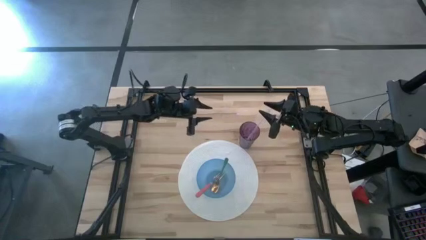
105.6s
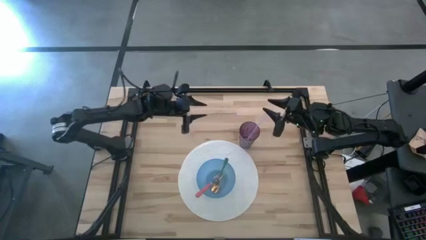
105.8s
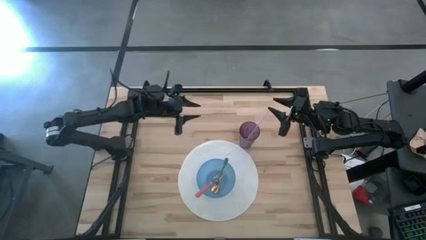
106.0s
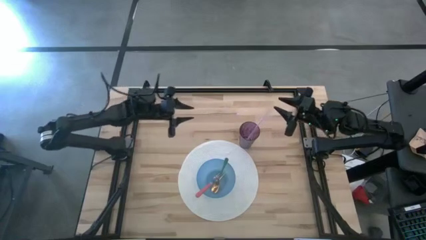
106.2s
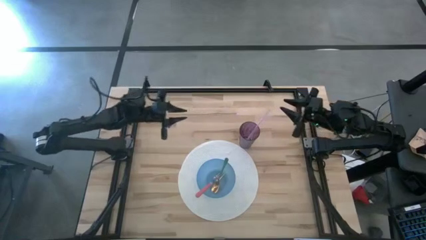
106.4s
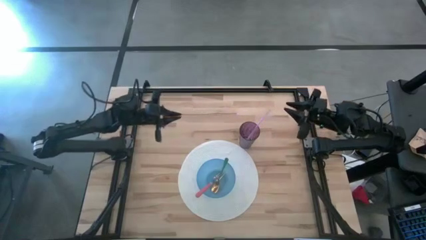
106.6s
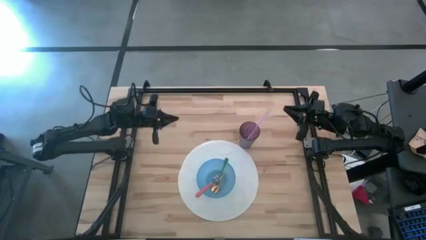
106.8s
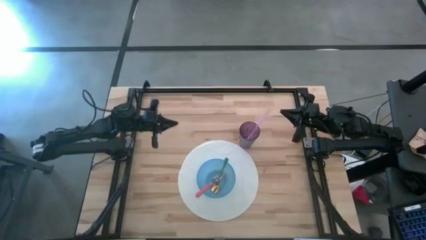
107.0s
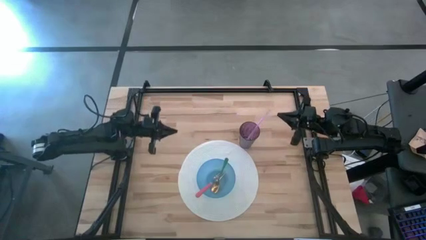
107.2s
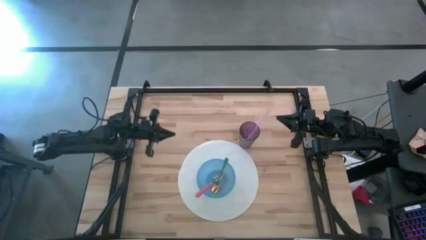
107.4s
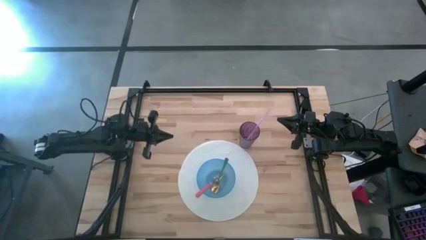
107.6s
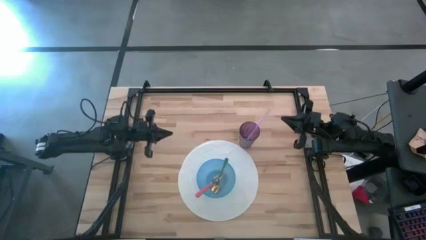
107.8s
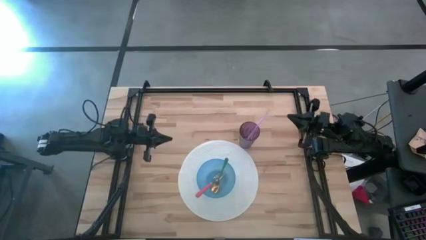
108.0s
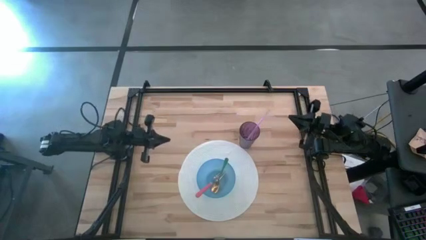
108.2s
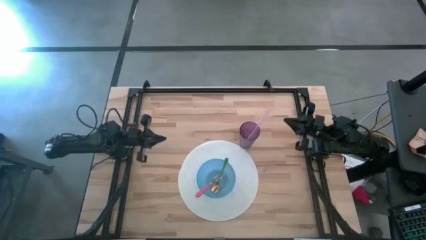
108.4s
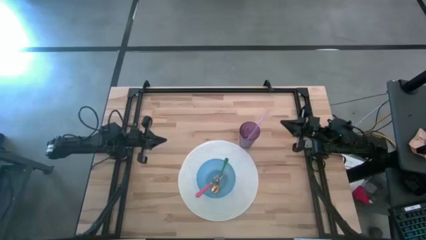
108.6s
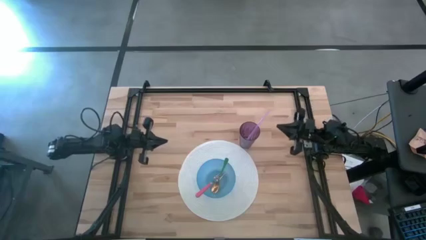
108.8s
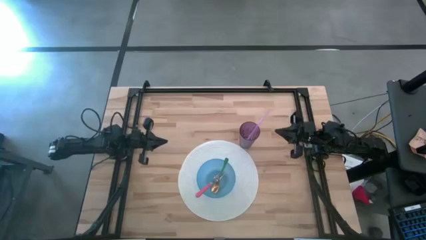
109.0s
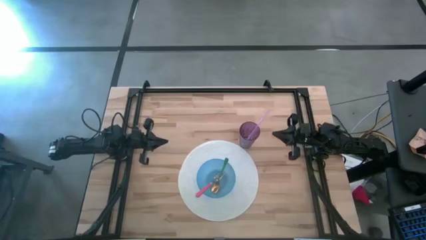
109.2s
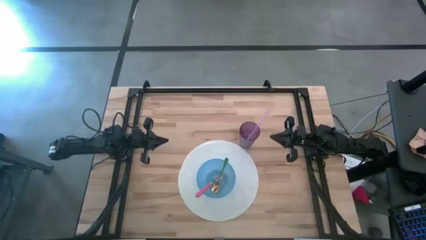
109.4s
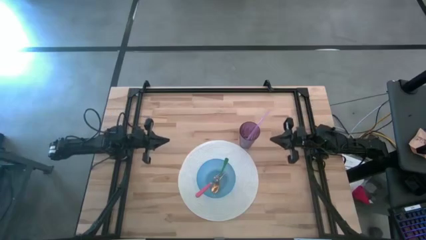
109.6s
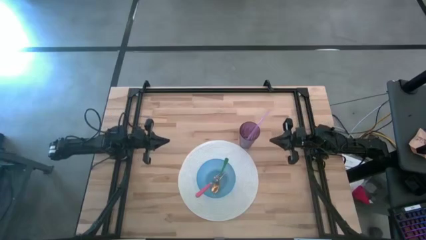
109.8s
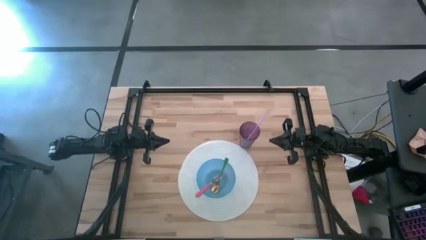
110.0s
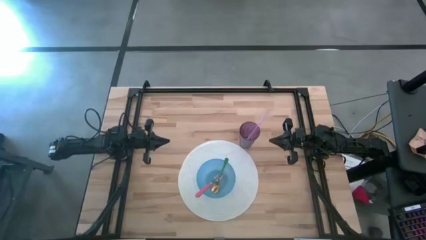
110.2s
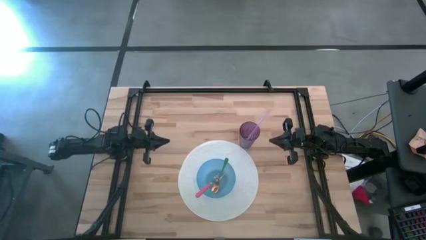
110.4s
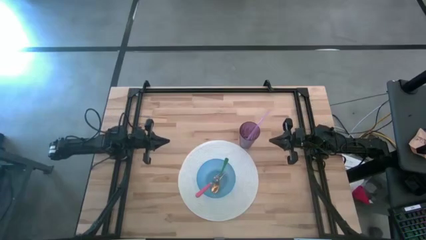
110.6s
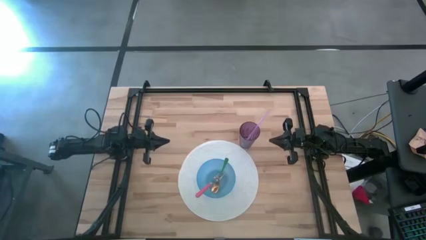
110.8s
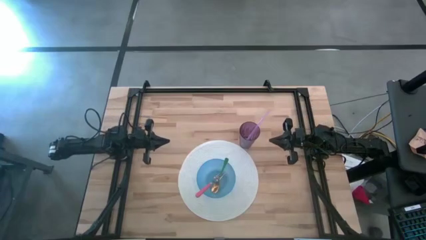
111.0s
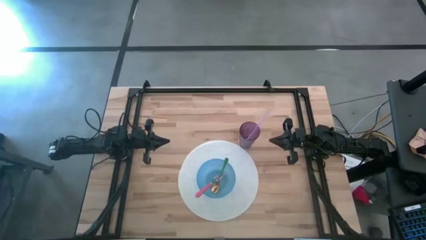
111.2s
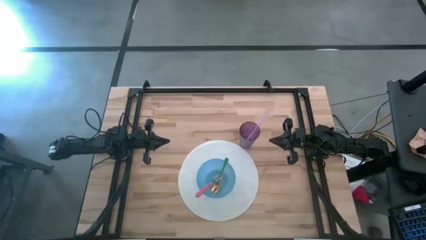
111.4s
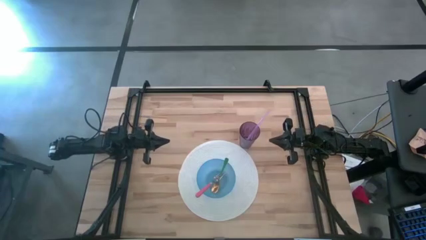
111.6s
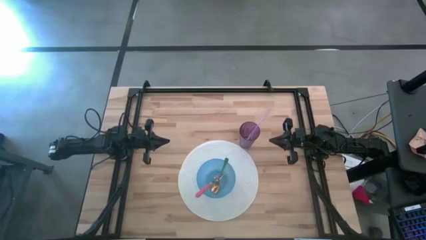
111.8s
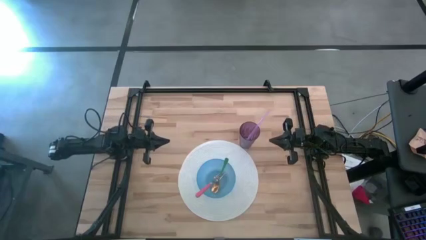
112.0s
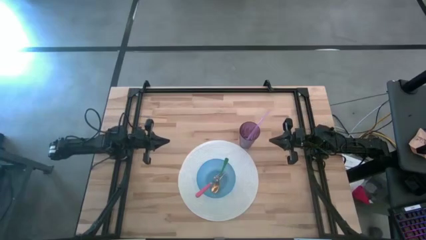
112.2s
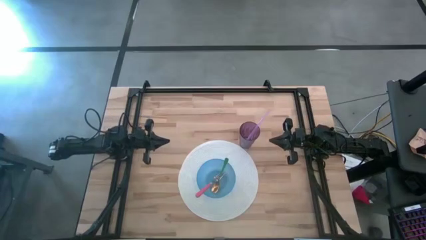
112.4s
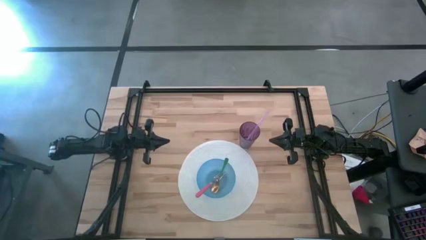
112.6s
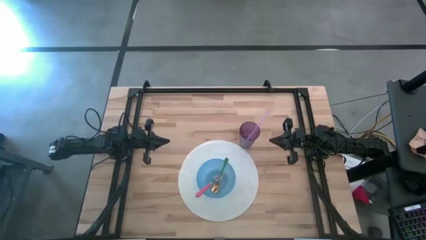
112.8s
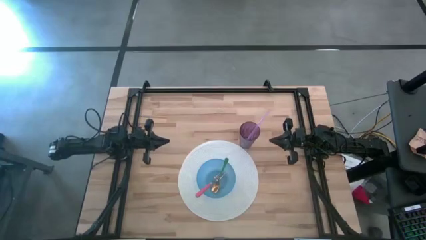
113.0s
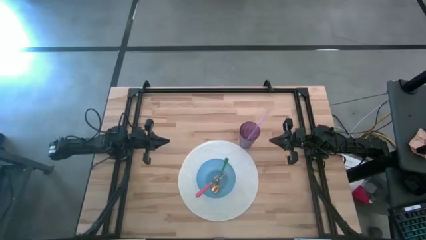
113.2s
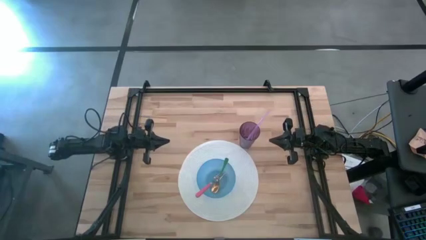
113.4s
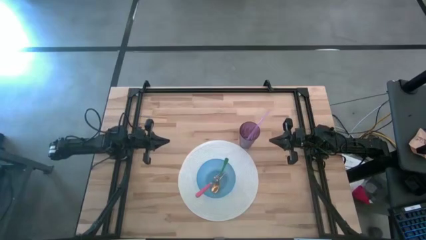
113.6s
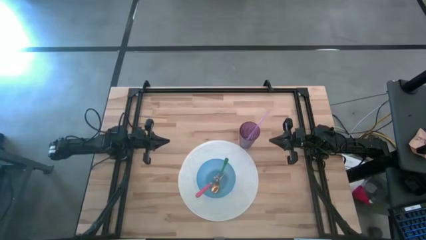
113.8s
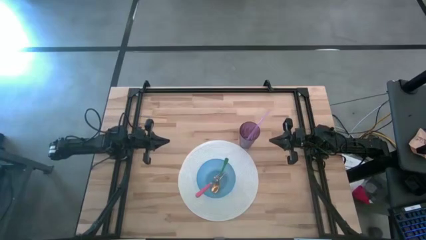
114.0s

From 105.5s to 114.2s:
Task: Pick & Place Utensil
Return to Home Position

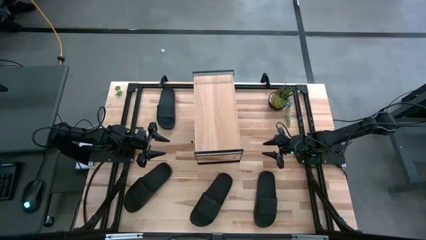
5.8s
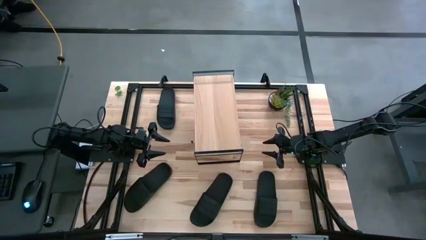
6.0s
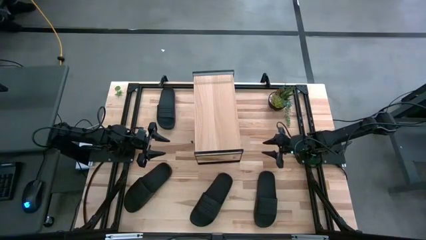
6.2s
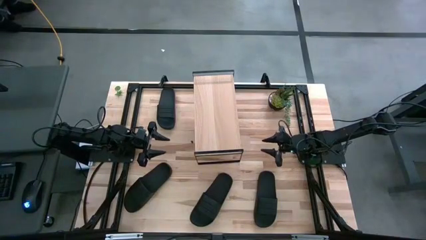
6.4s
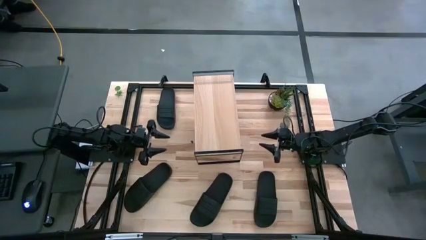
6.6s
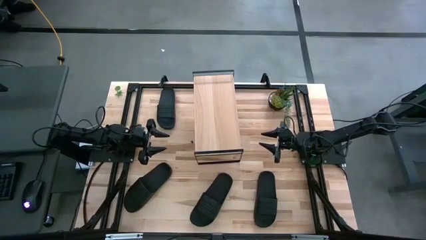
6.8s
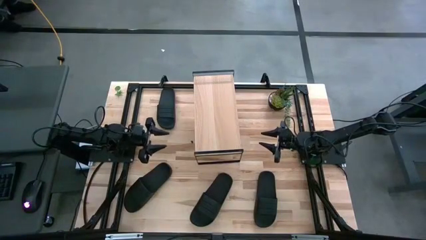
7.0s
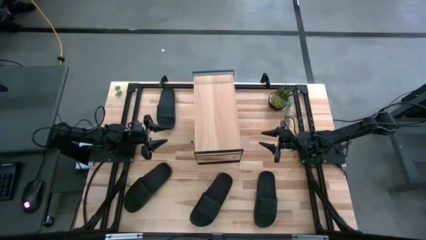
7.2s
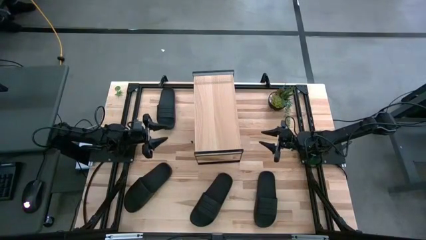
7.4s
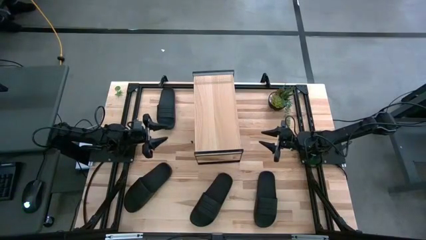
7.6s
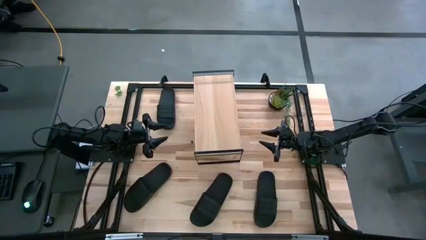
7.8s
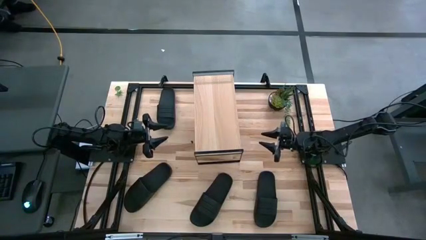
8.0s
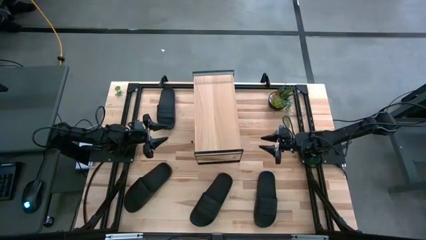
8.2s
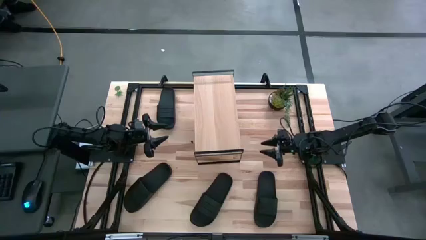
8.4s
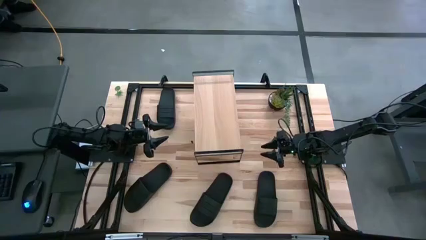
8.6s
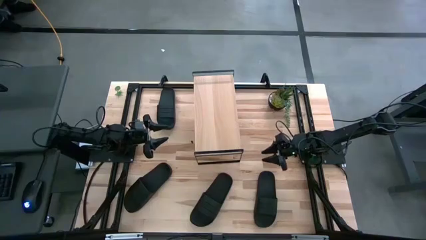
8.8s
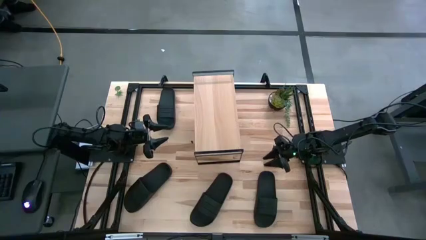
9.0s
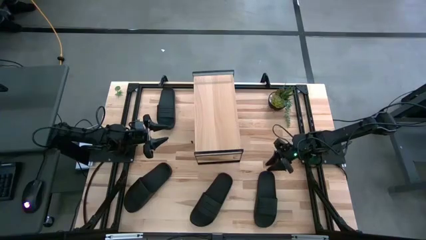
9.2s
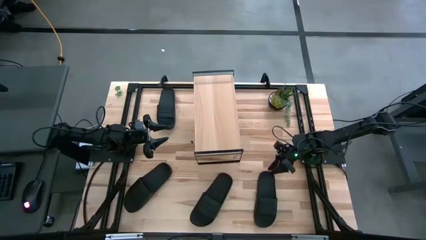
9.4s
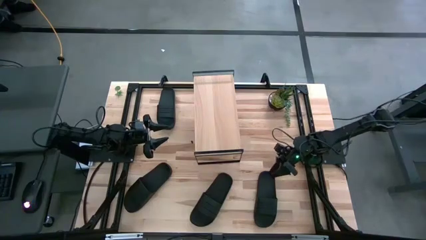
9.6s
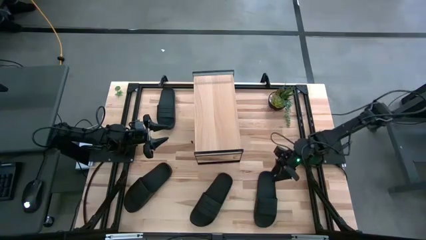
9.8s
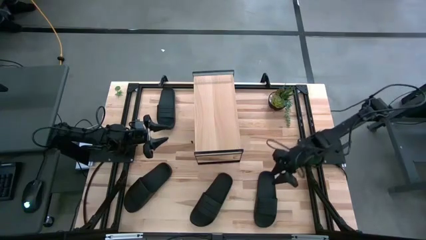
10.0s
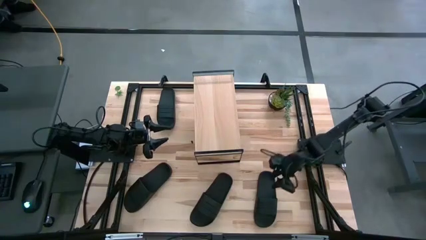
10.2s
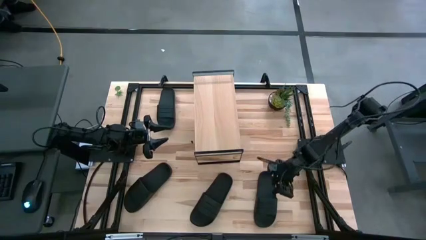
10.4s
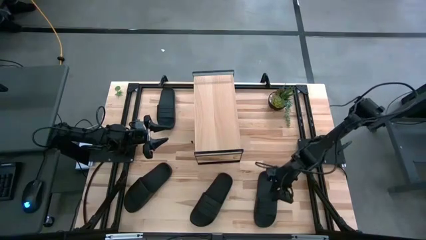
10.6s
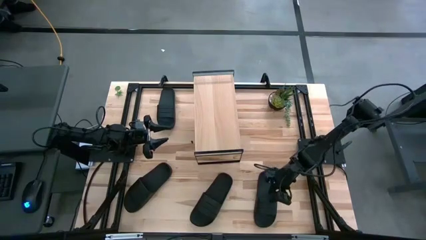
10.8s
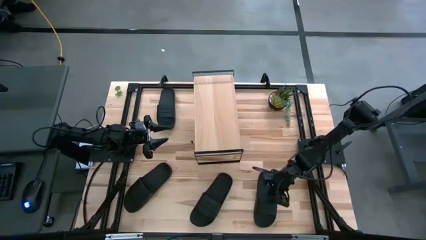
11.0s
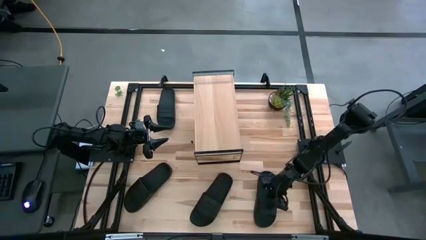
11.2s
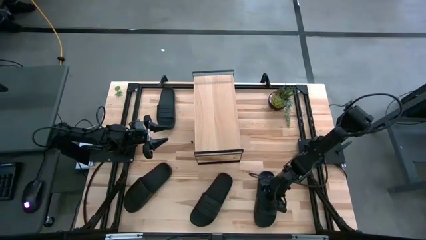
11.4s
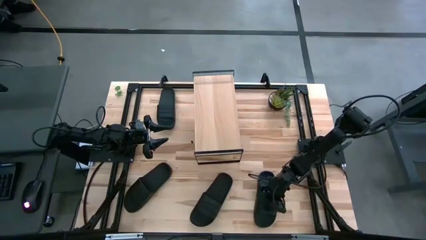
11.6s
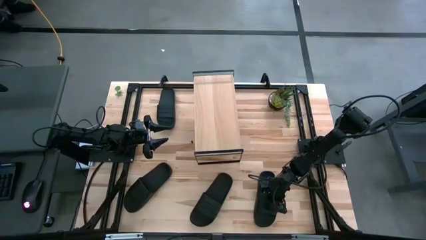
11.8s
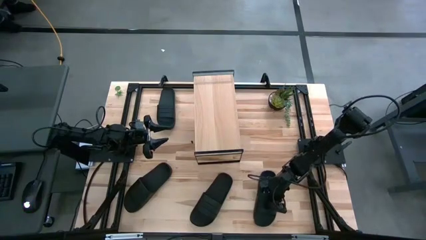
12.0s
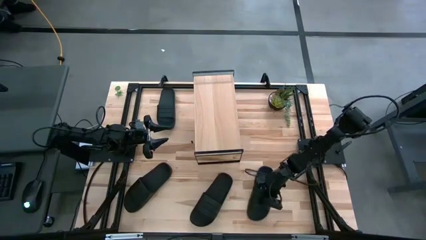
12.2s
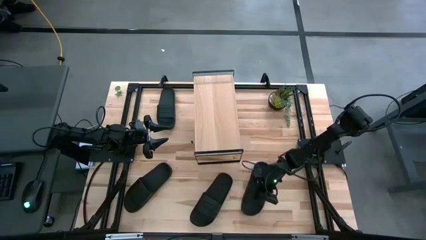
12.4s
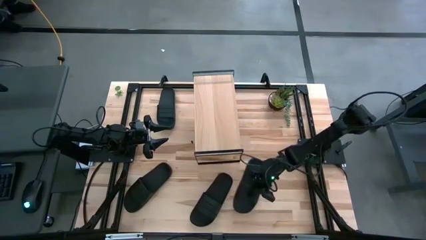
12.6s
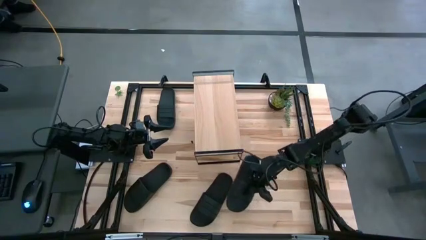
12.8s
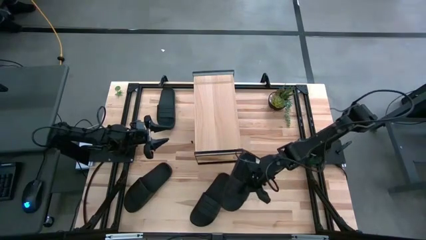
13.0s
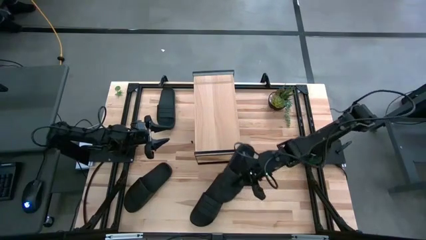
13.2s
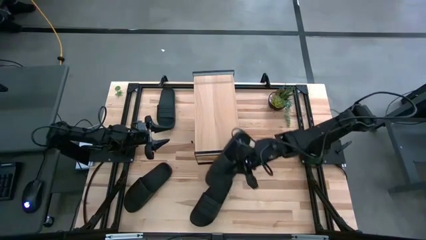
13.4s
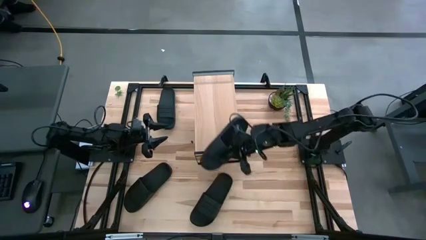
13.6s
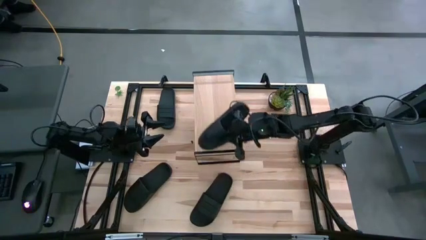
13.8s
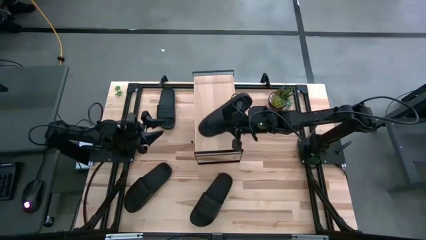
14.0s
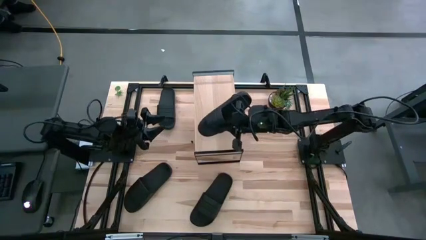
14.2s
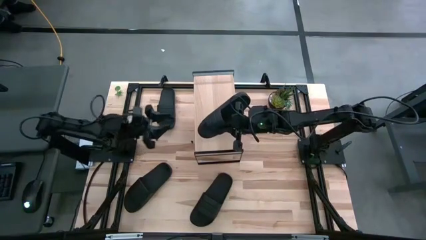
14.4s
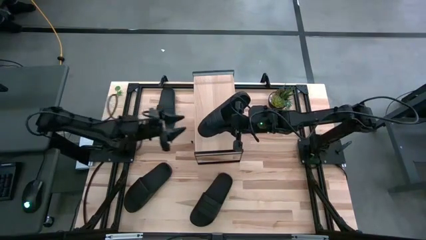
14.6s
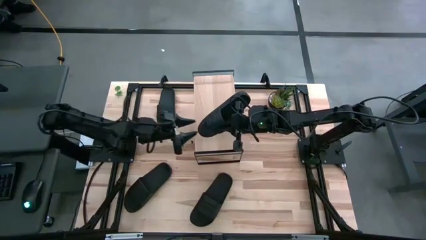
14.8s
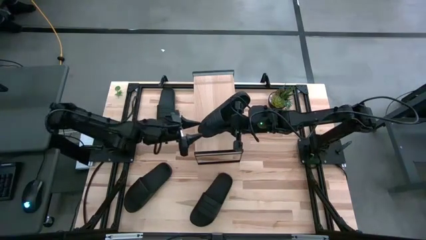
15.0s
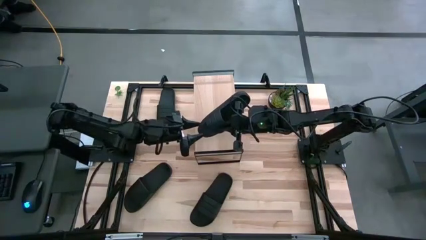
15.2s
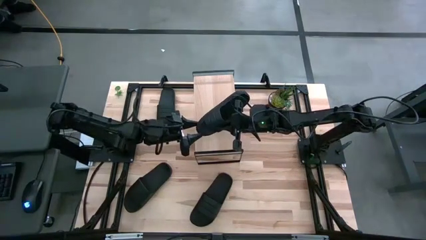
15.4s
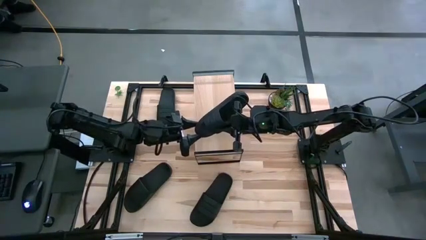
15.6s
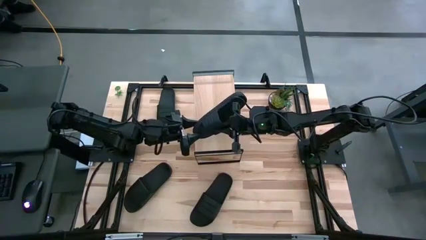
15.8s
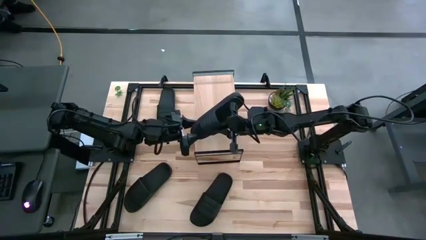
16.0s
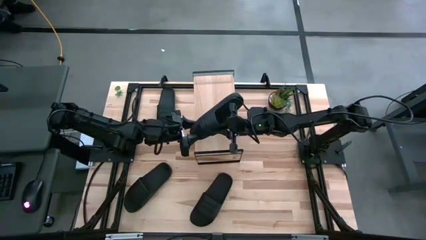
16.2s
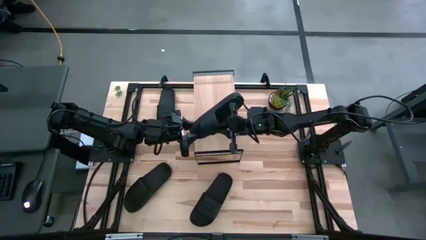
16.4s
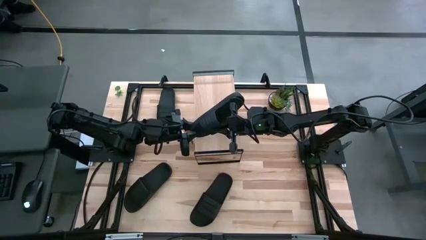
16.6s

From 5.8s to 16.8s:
Task: Pick and place slides into the shelf
Put the bottom right slipper on the shelf
